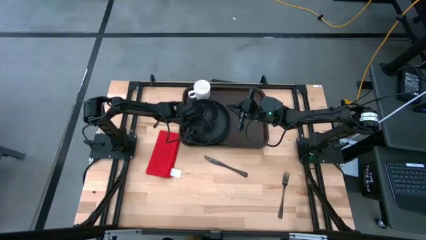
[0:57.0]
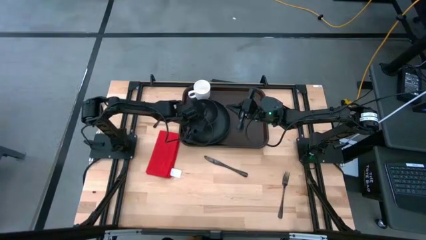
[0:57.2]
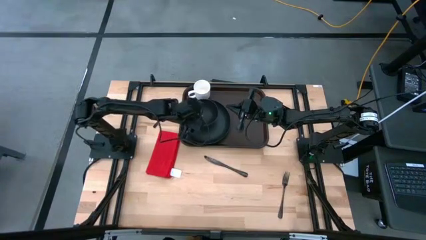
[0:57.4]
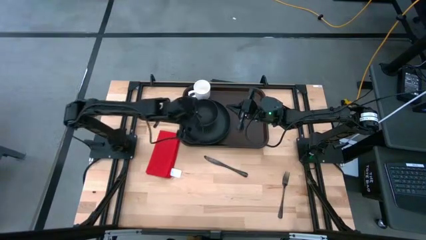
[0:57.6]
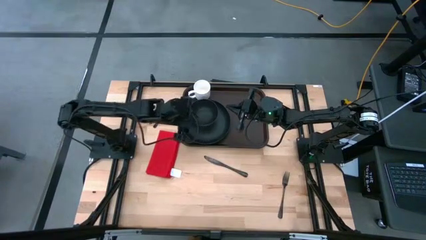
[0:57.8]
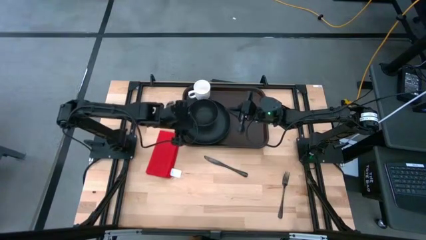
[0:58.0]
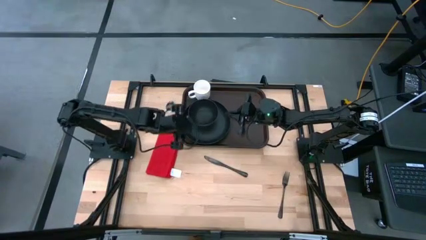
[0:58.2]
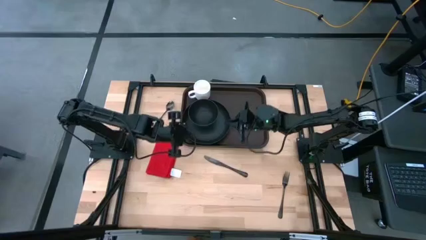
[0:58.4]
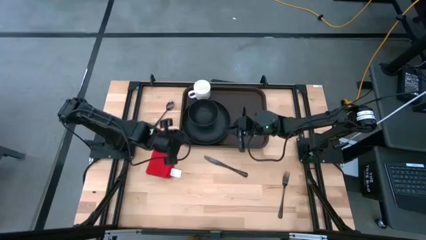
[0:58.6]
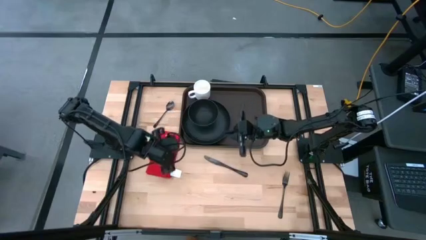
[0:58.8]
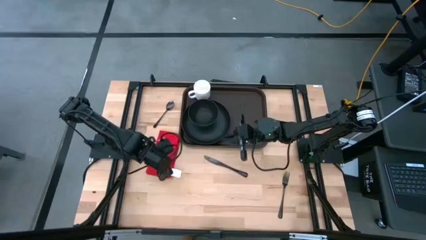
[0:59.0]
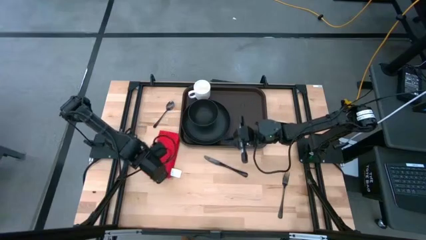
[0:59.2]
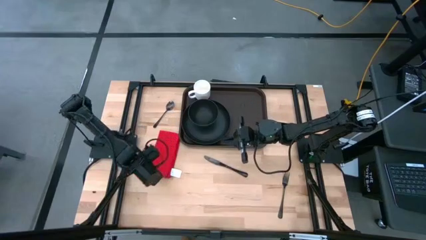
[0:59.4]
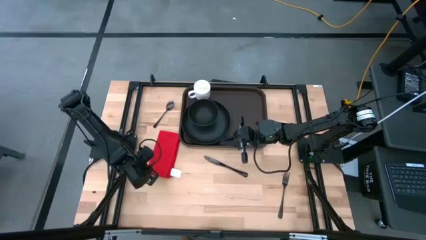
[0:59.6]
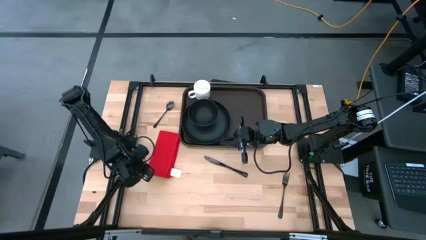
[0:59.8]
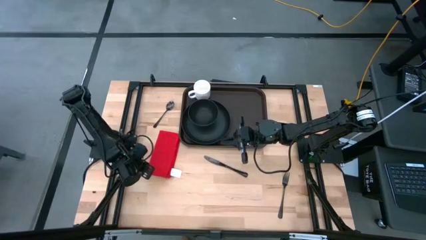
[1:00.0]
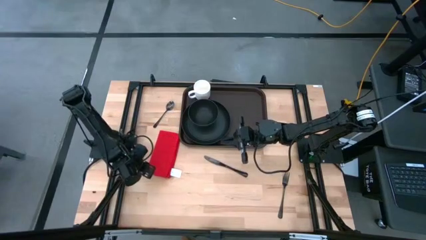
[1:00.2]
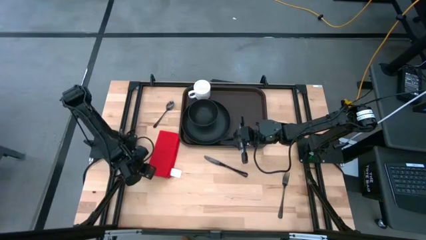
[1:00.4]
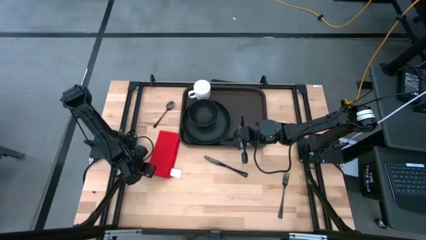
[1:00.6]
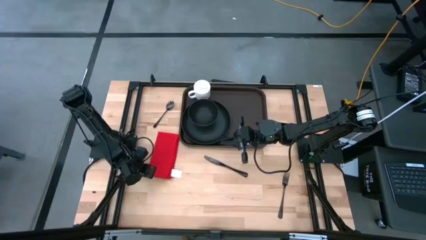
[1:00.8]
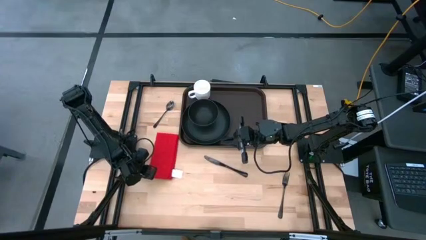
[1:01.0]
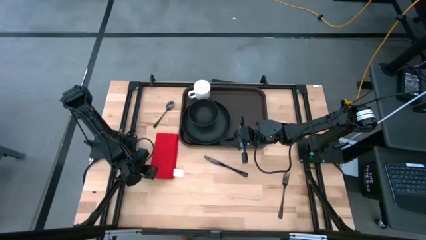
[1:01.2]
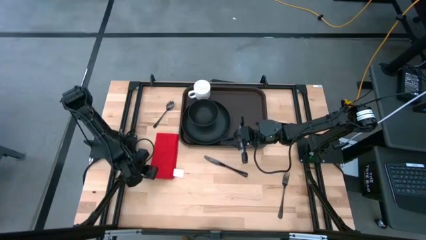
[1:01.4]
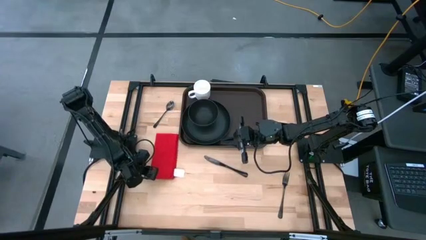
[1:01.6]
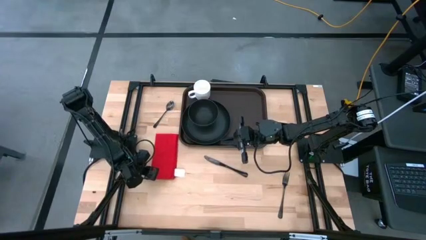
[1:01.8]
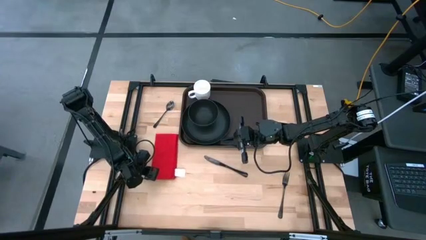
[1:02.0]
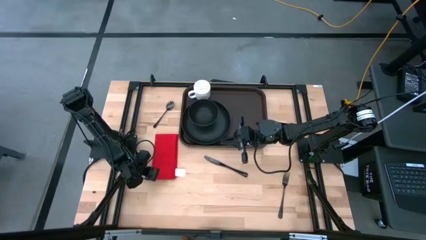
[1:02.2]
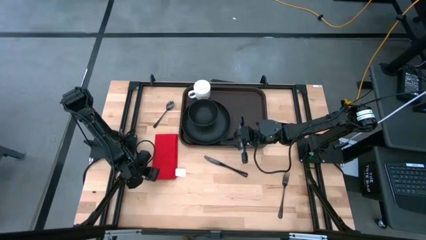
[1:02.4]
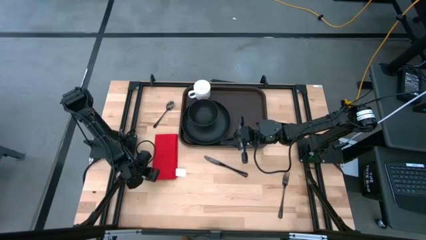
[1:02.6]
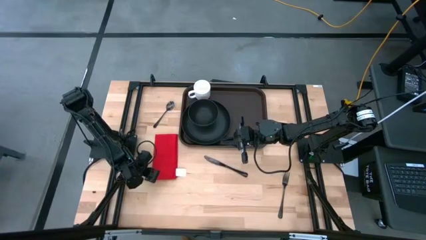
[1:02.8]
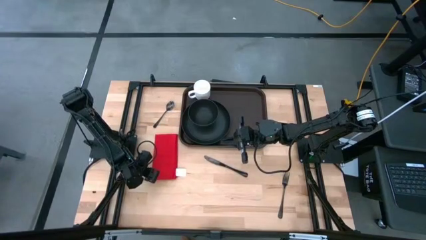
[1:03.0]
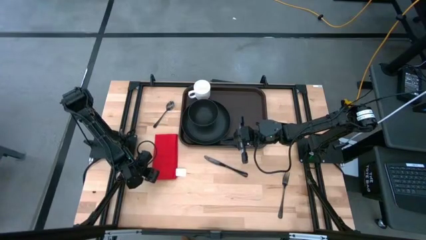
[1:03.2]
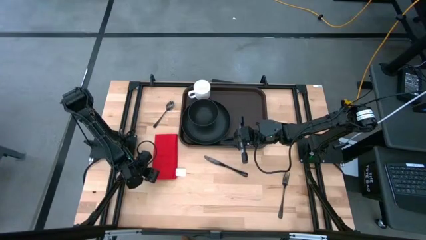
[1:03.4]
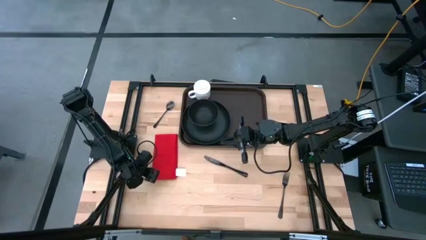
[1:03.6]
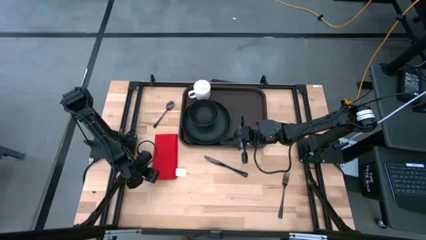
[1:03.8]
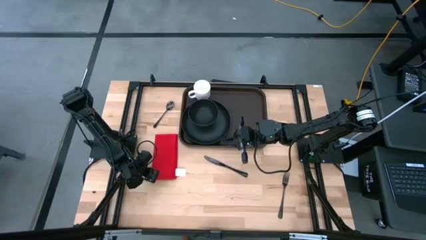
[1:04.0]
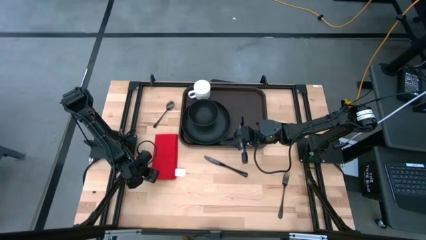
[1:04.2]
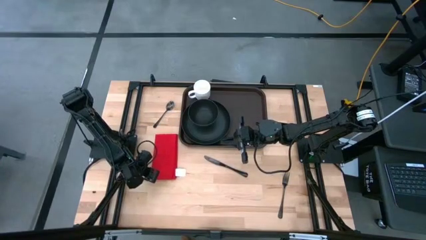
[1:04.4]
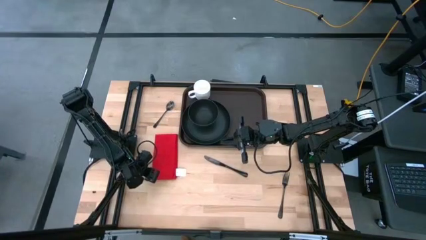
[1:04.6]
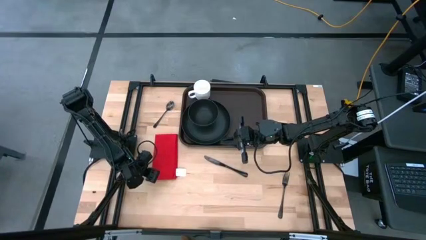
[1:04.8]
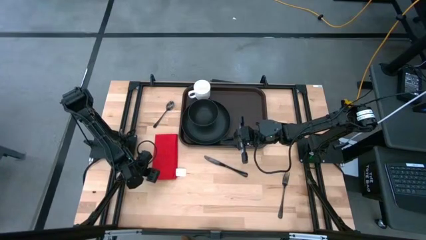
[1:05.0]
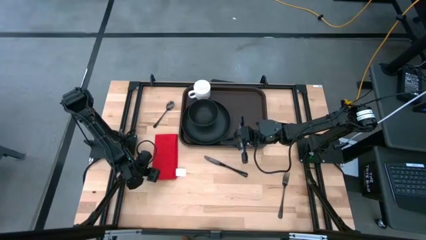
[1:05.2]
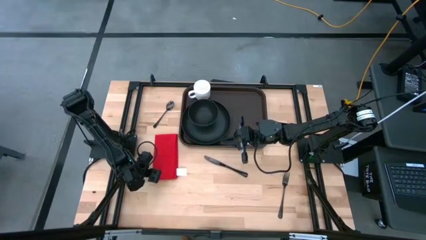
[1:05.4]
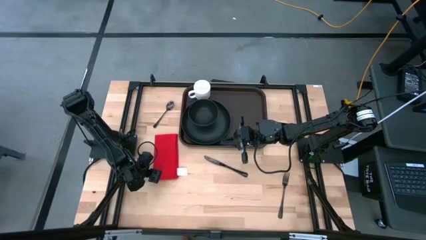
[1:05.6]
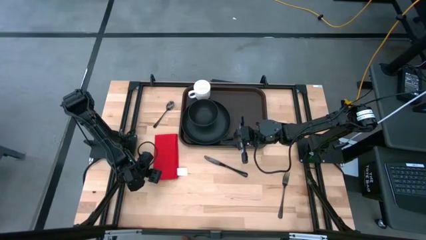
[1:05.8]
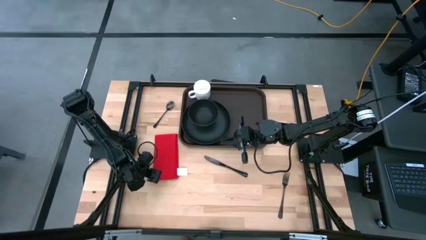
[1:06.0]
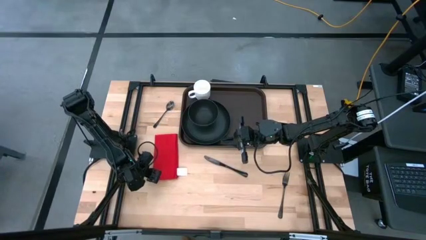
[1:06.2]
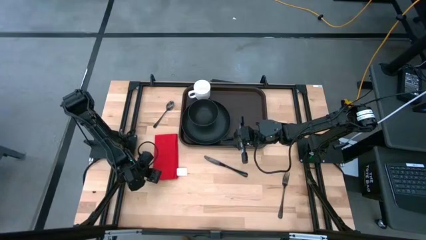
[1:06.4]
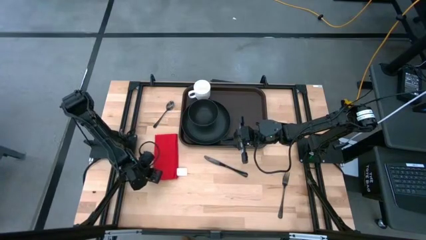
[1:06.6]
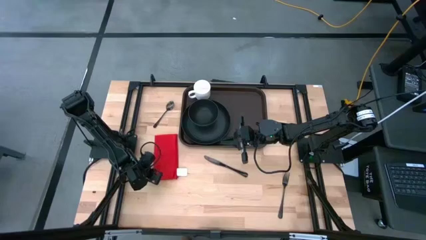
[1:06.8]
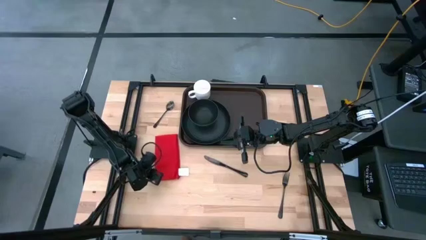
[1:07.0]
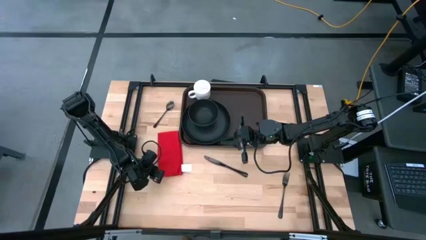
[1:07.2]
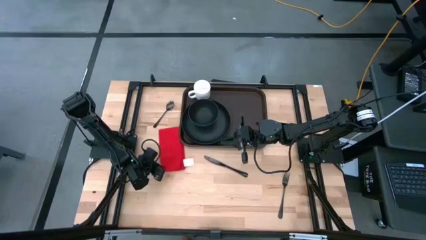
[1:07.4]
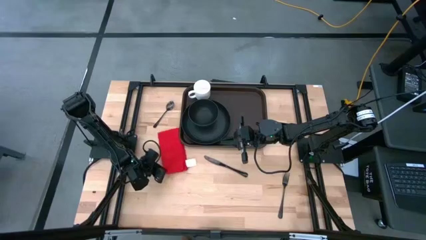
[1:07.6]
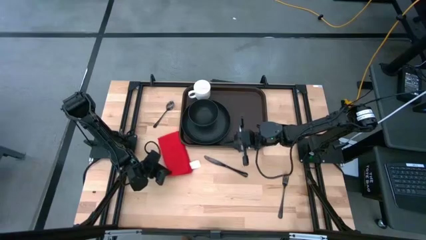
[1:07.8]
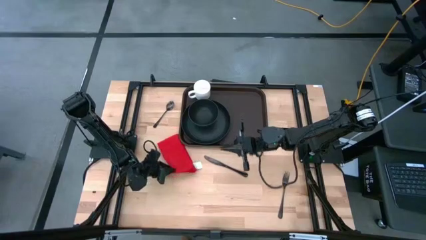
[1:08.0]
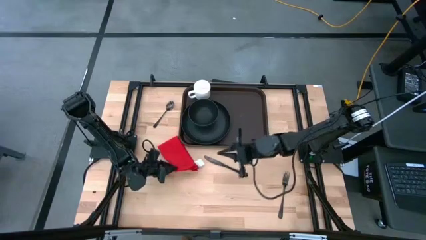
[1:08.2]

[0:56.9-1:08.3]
Task: Set up tray
Put the red napkin on the brown serving tray
